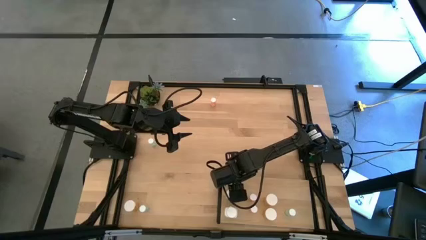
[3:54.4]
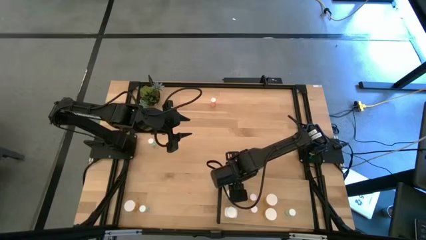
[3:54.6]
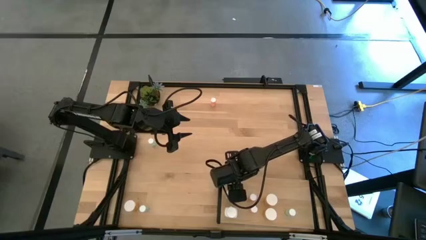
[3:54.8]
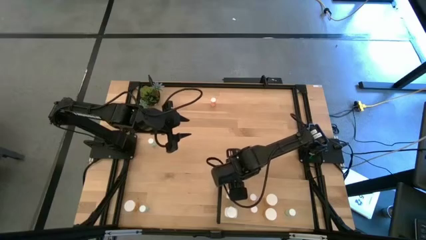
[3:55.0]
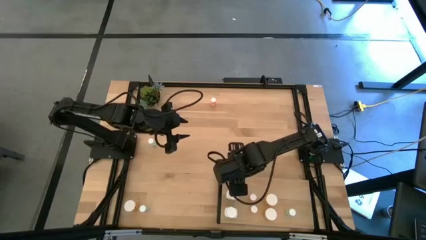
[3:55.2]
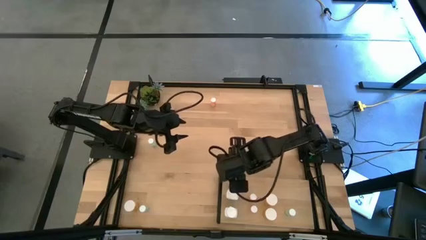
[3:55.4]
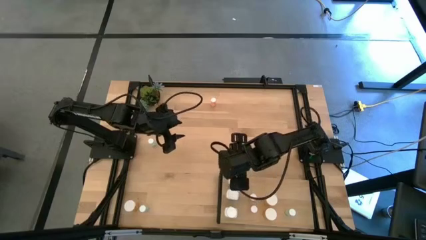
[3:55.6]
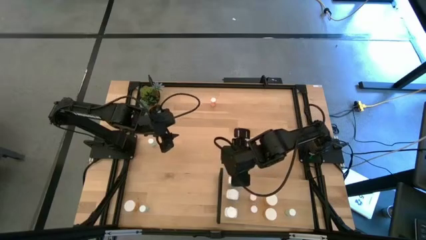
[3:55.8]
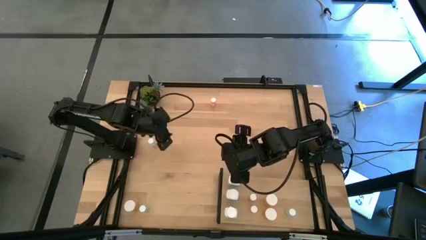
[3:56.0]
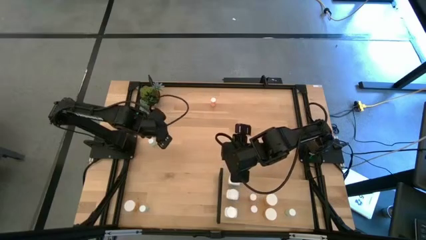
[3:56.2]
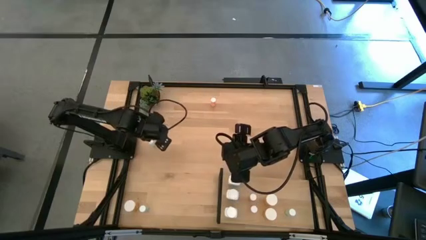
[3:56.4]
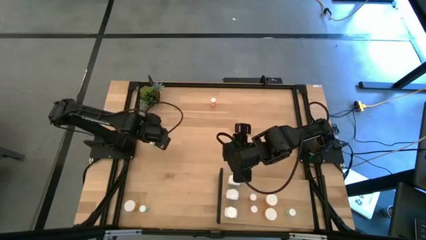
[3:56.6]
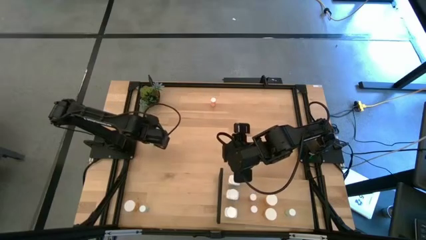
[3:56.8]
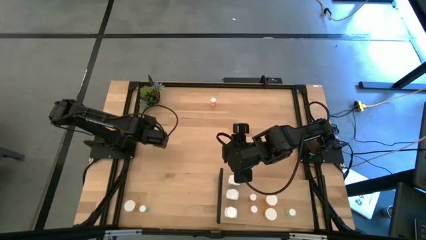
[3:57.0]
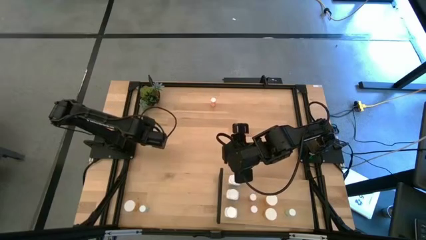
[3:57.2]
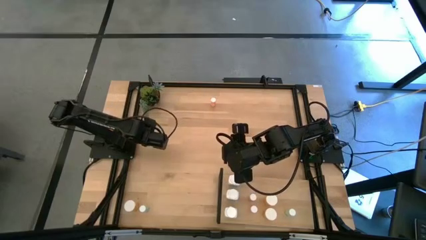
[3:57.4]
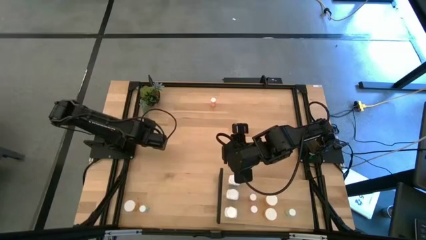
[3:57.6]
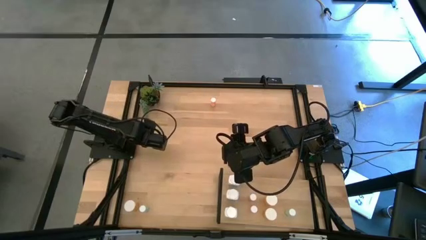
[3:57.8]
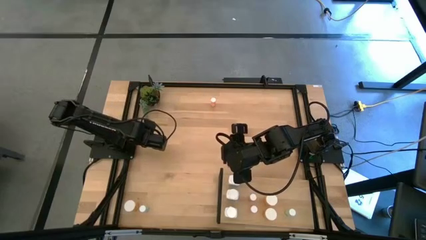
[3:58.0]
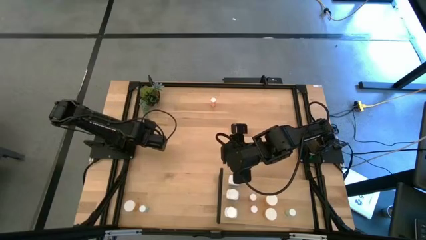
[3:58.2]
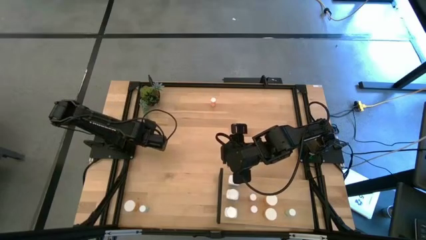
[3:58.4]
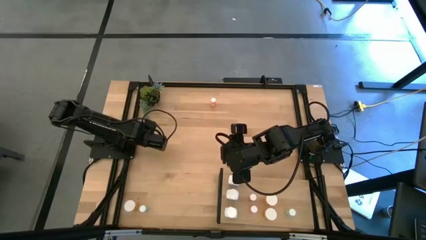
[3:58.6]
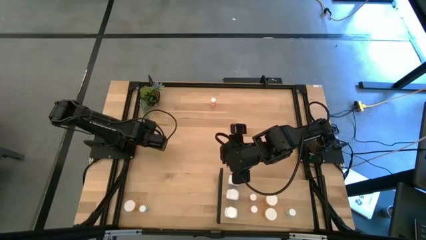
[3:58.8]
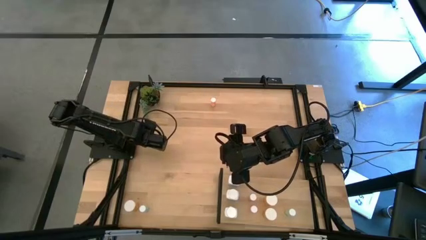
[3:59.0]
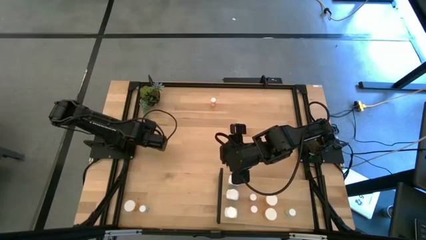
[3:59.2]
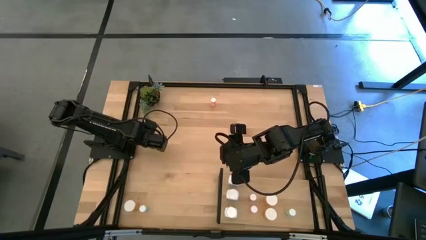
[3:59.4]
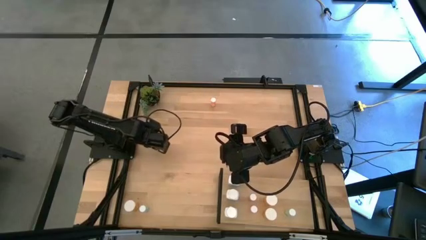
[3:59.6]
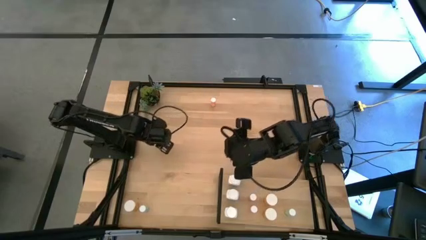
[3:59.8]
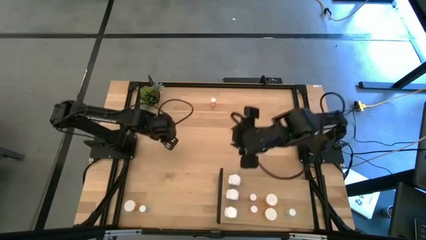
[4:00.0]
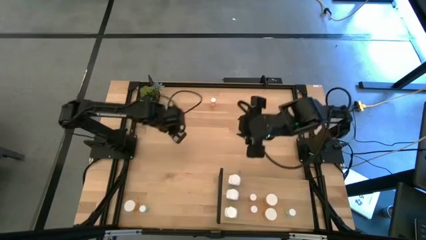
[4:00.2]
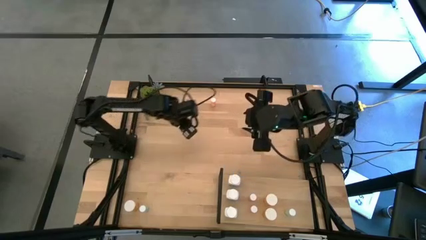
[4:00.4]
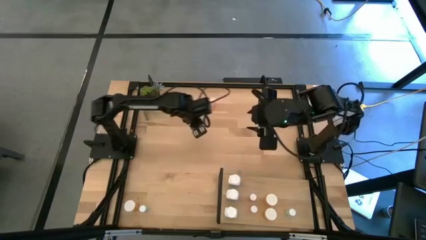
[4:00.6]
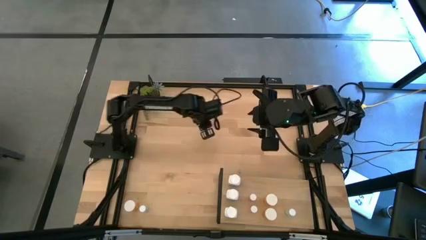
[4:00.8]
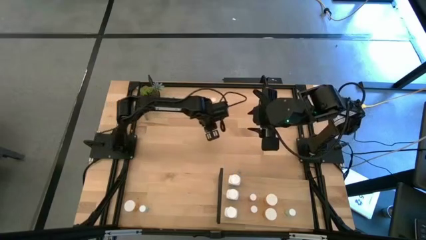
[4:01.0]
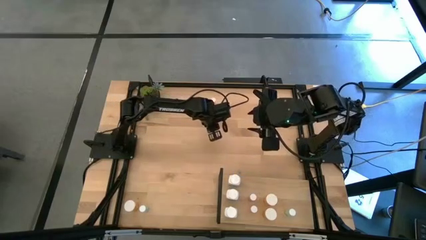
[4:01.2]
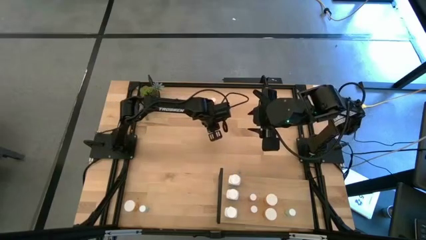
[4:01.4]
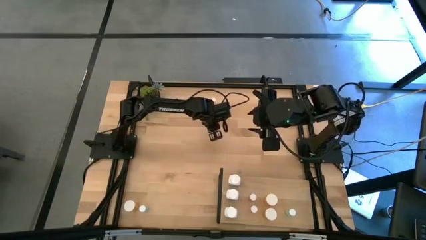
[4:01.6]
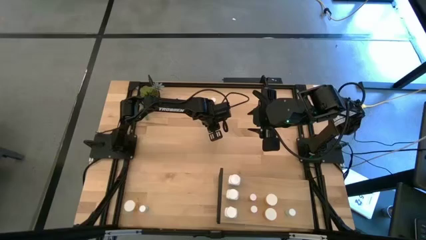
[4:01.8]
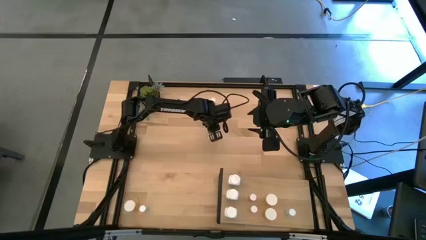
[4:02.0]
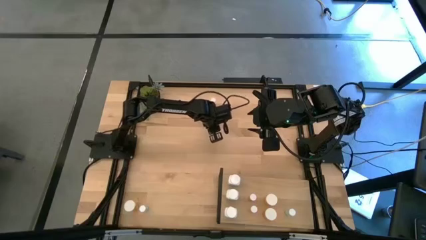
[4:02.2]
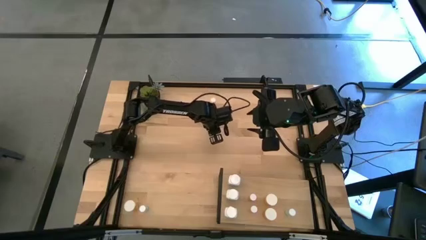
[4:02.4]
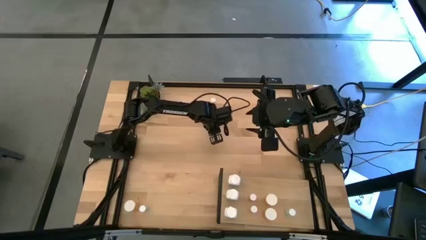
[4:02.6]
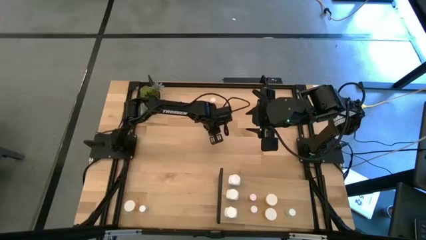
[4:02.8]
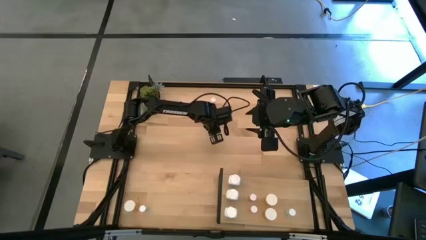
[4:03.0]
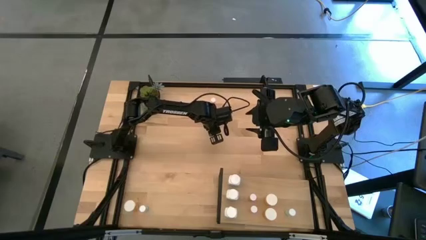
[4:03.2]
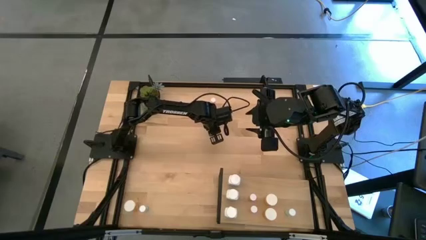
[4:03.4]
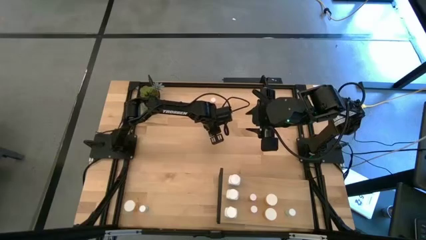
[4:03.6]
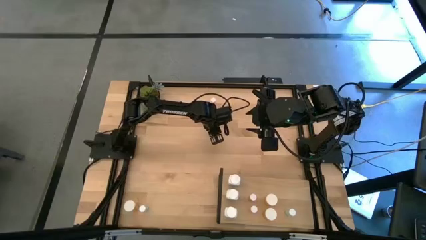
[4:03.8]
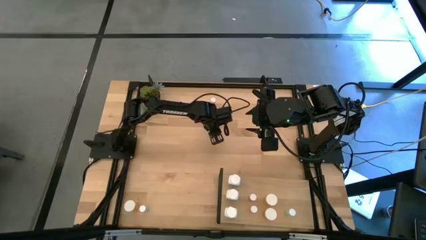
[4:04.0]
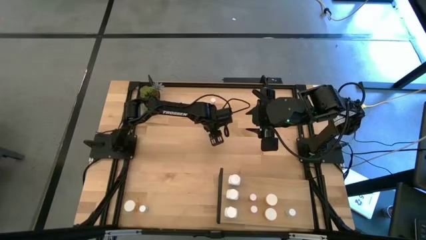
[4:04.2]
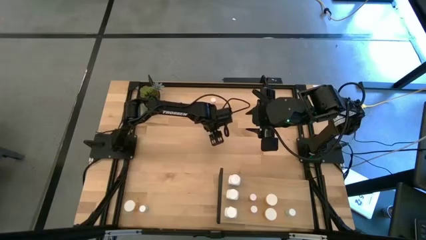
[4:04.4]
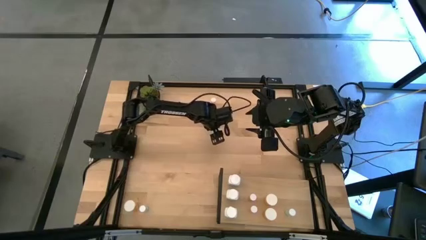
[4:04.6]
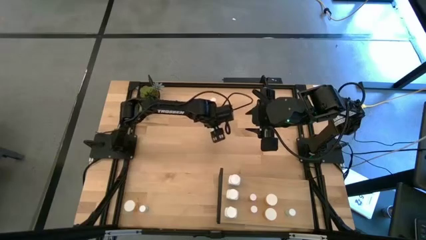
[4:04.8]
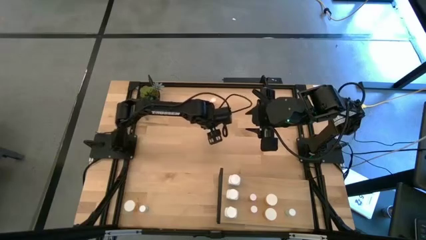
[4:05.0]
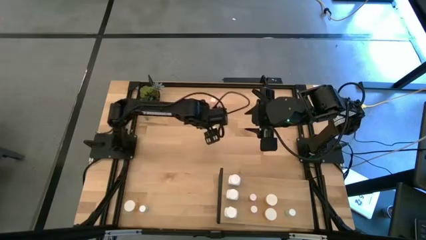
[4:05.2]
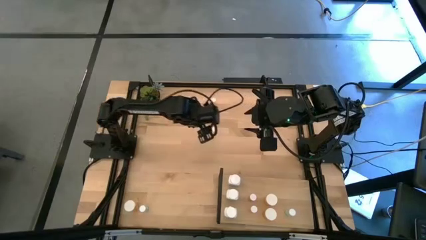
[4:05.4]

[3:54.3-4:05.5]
Task: Pick and place medicine bottles onto shelf by color
Put the middle left blue pill bottle on the shelf
